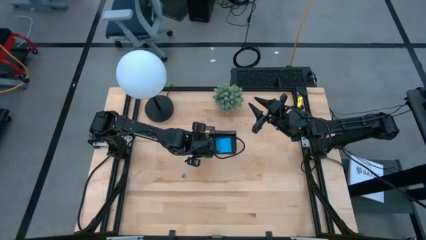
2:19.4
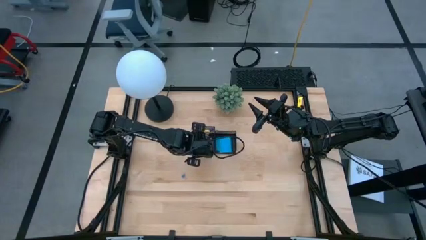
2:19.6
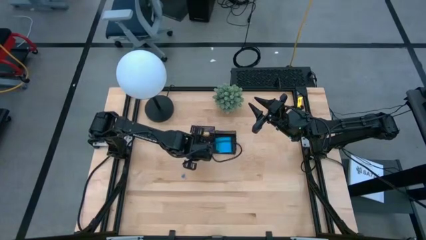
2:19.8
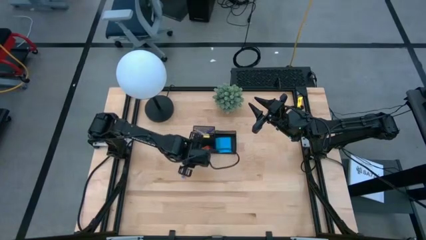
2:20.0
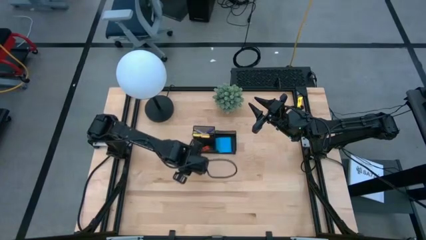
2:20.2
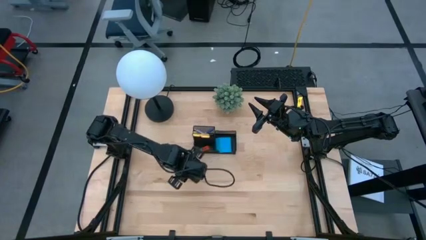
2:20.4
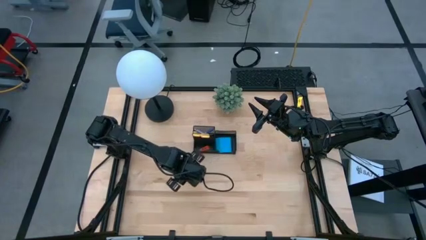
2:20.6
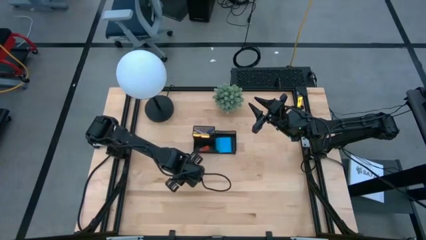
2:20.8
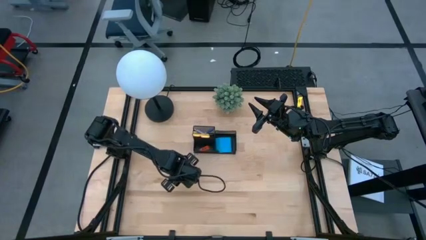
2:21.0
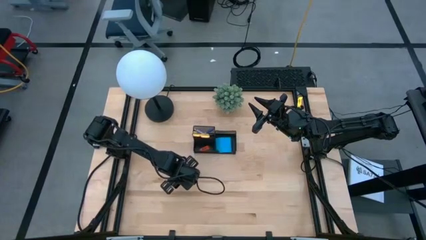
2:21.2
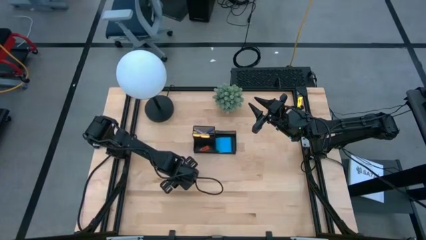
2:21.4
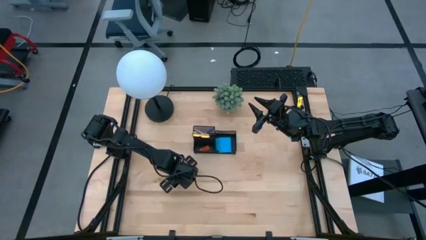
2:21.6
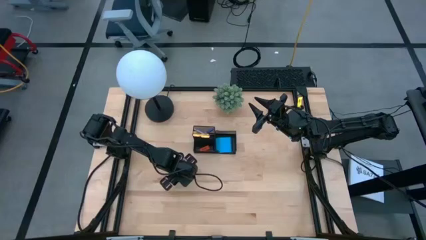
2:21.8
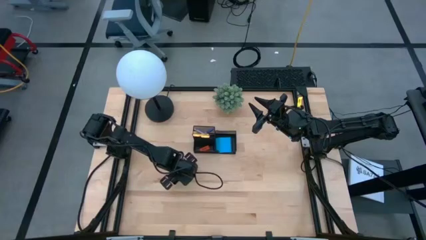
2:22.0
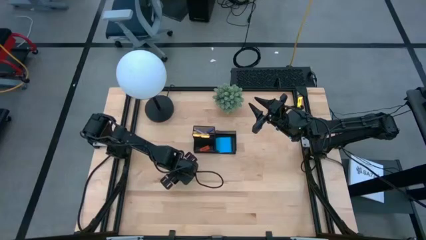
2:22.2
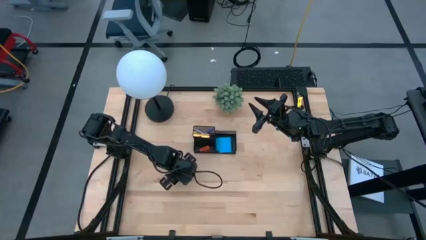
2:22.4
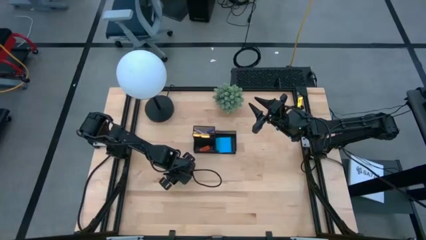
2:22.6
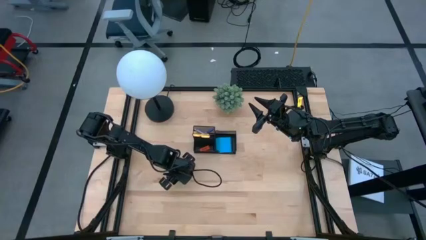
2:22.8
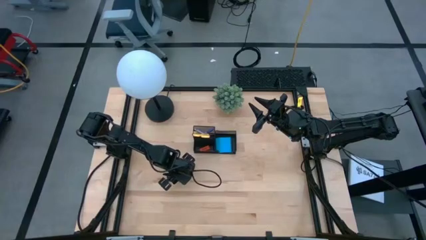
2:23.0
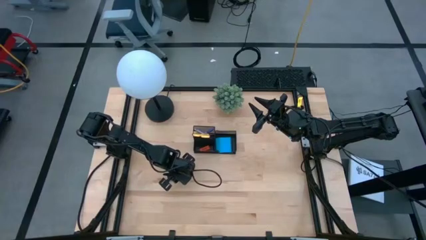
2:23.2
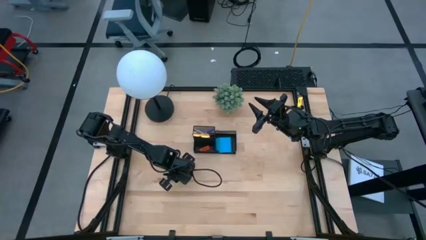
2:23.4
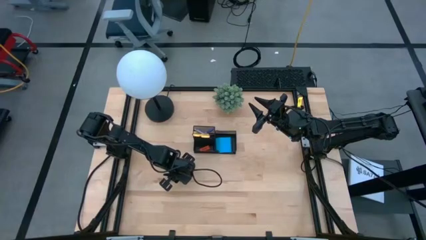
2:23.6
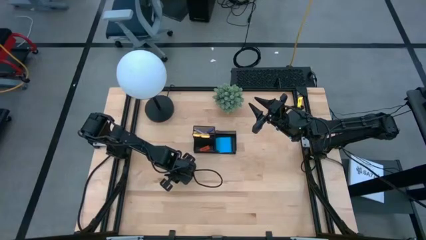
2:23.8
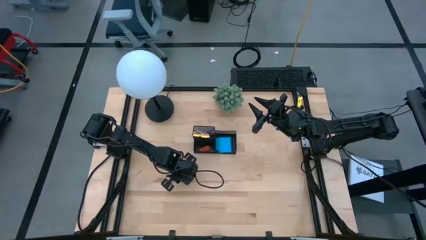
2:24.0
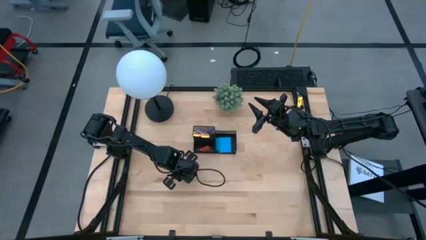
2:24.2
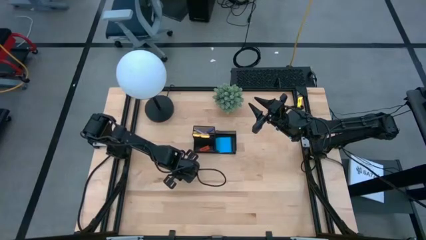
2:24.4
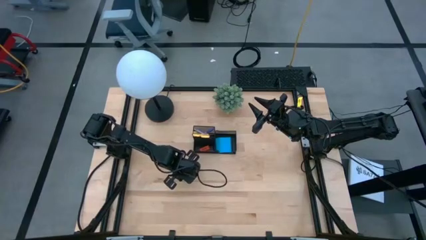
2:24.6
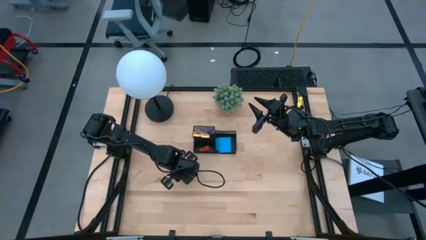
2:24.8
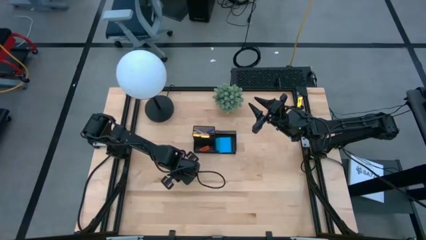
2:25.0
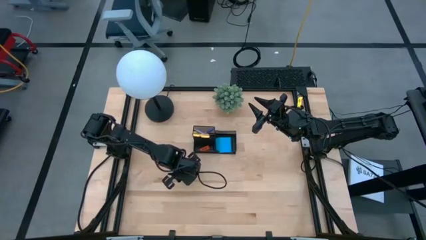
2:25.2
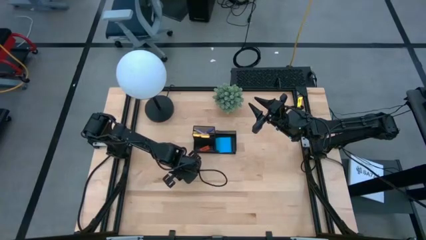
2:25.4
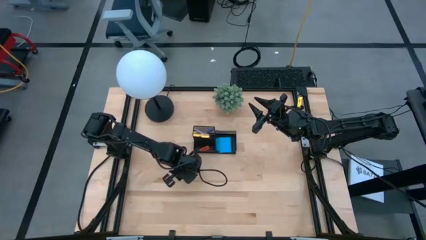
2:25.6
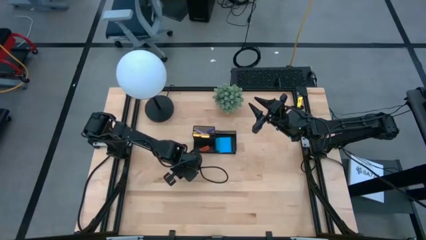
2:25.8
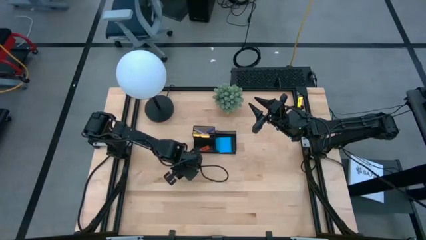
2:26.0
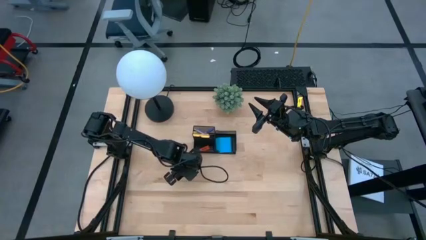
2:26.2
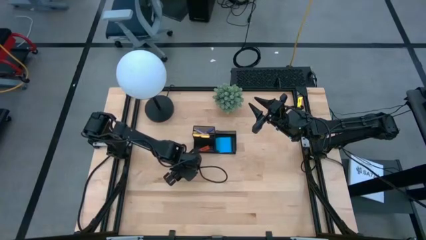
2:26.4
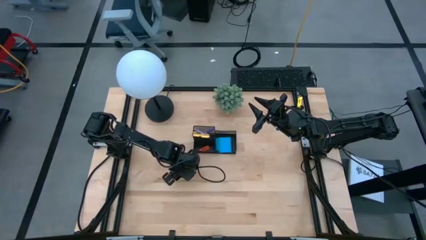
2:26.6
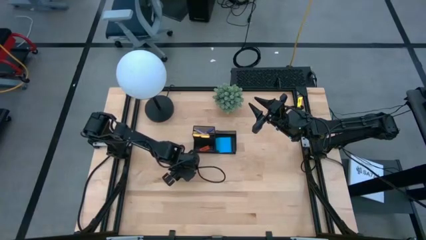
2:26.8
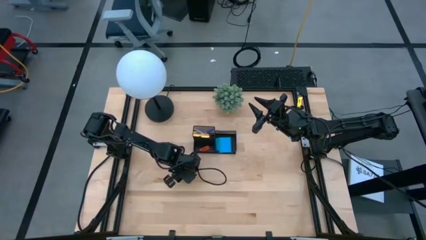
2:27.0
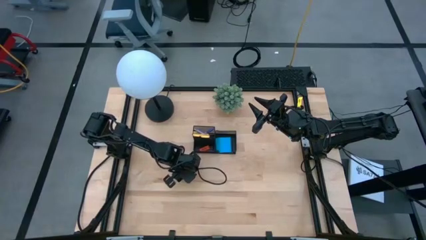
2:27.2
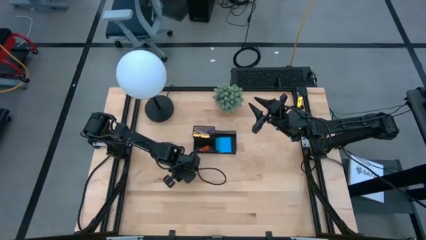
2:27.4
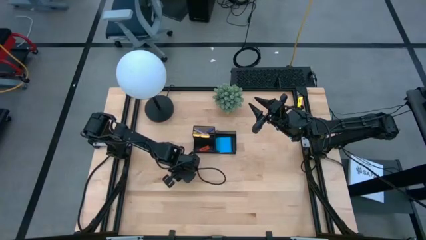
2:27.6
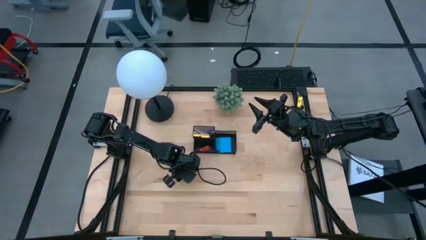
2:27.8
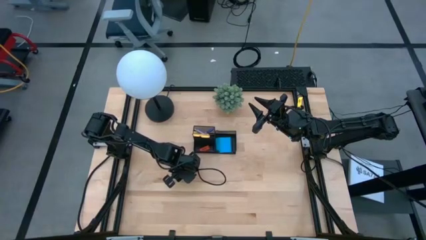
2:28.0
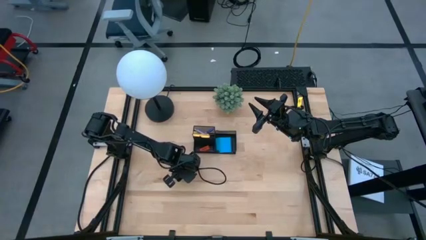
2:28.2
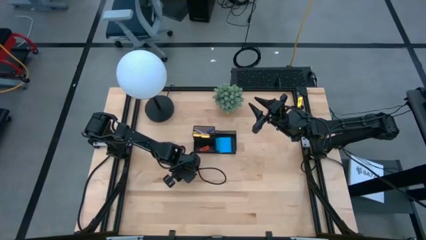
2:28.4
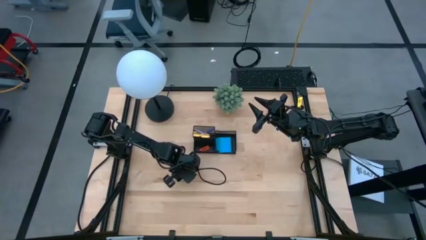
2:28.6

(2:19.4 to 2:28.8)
Task: Pick and place office supplies into organizer
Put the binder clip into the desk organizer

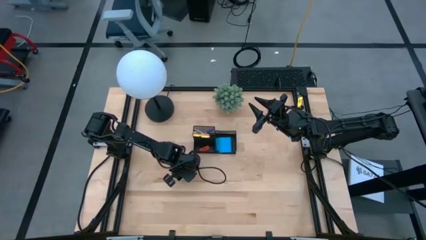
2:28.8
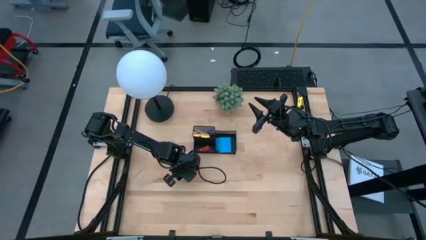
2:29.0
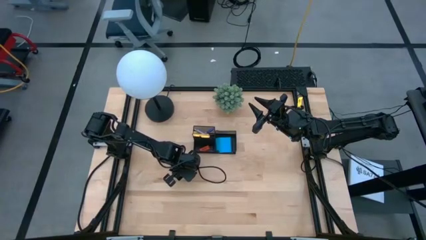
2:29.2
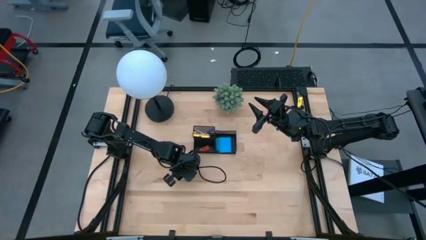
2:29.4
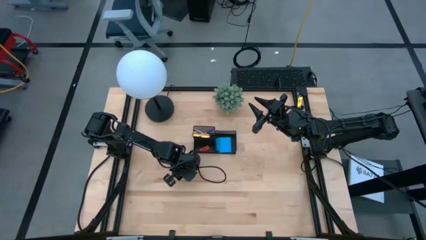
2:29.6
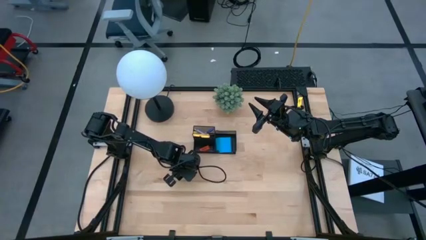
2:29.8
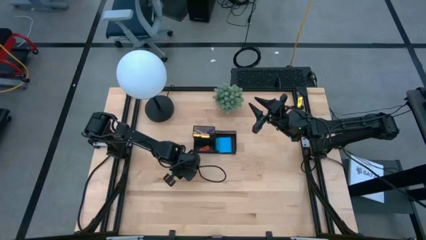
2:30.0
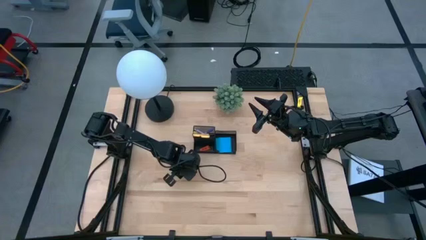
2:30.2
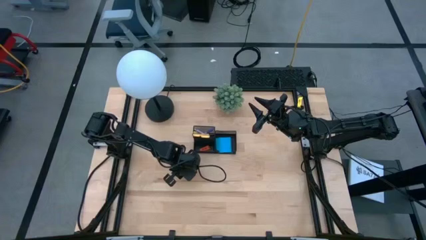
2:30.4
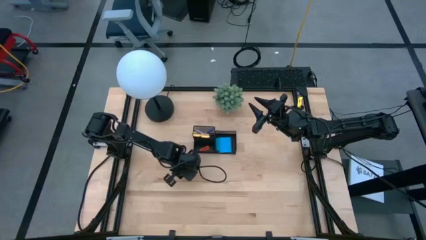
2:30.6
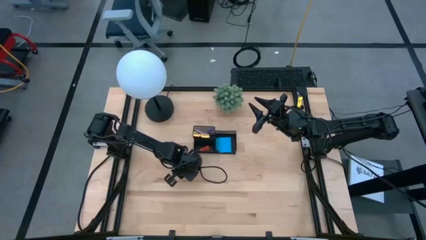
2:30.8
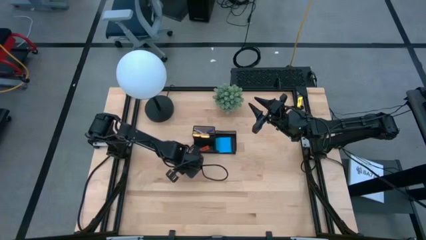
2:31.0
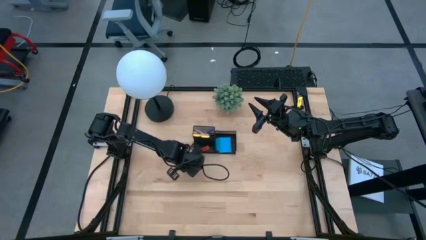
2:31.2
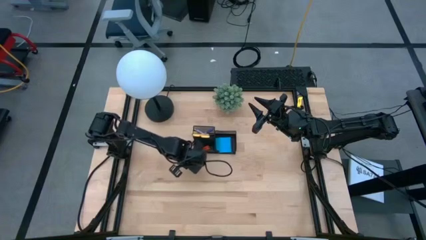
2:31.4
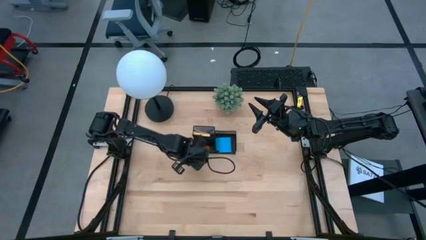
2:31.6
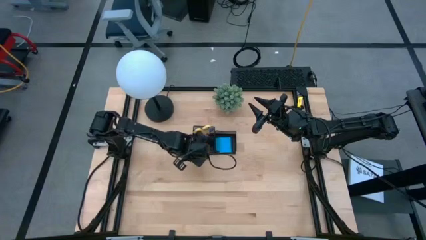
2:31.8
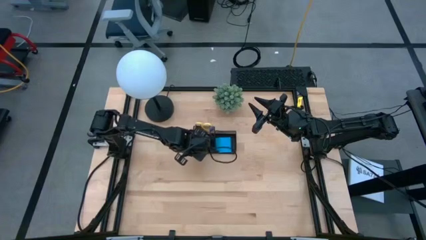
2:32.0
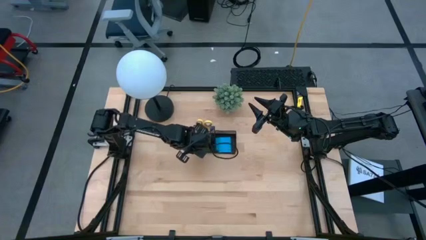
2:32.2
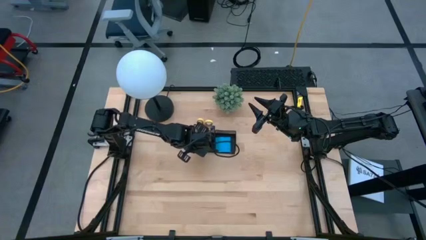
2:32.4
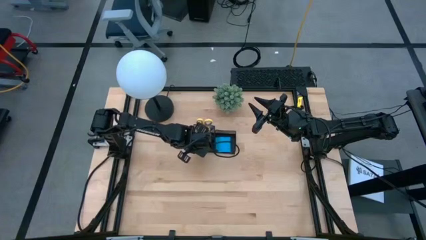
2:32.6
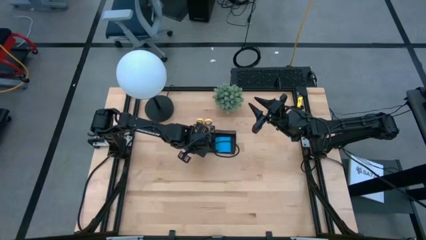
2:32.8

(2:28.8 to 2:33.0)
Put the binder clip into the desk organizer
